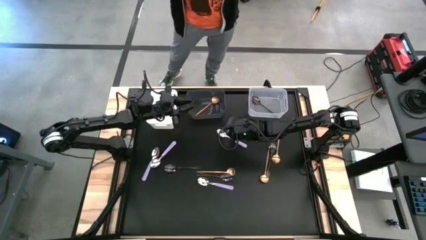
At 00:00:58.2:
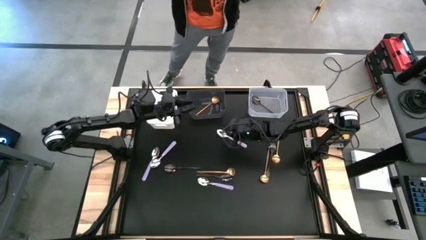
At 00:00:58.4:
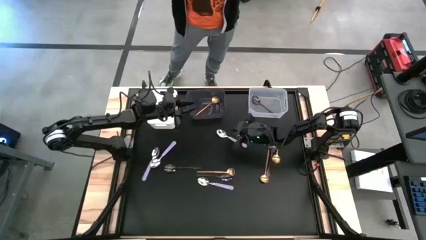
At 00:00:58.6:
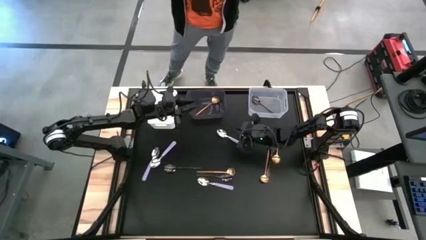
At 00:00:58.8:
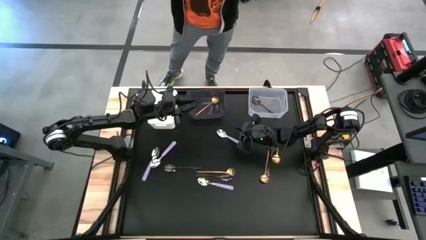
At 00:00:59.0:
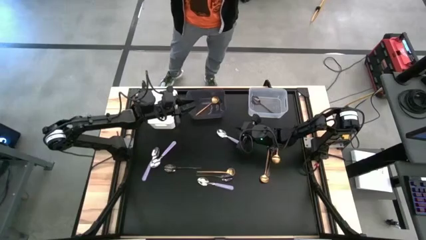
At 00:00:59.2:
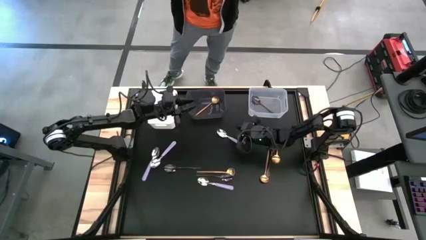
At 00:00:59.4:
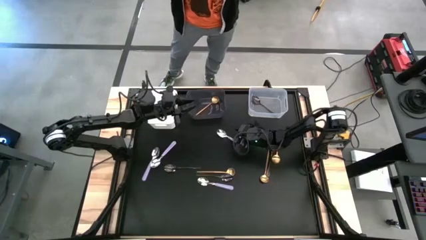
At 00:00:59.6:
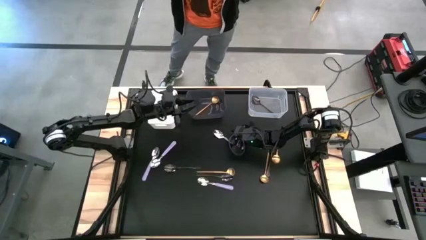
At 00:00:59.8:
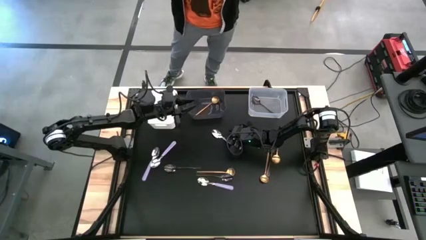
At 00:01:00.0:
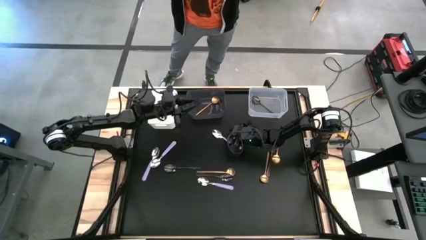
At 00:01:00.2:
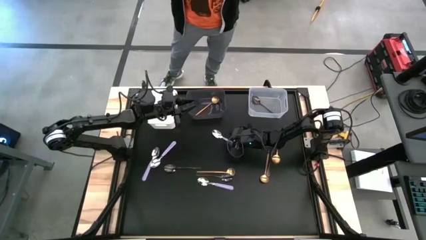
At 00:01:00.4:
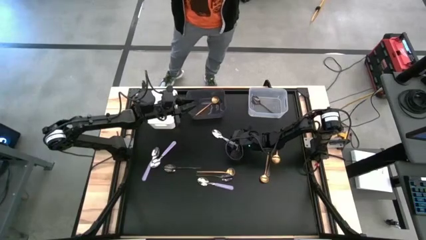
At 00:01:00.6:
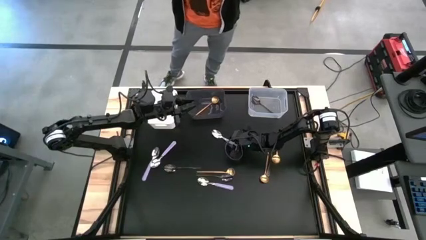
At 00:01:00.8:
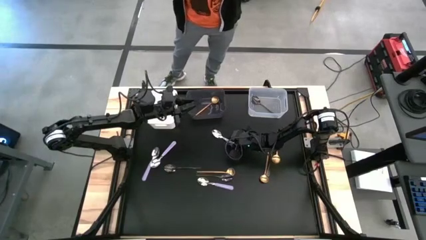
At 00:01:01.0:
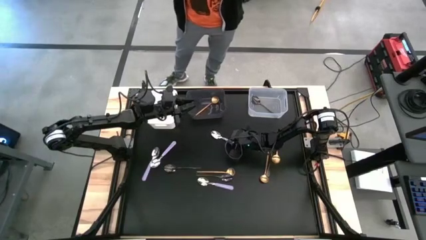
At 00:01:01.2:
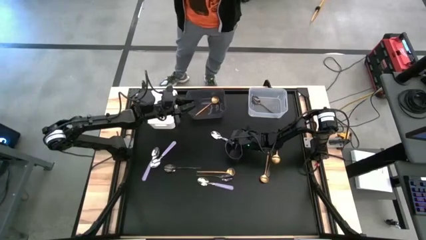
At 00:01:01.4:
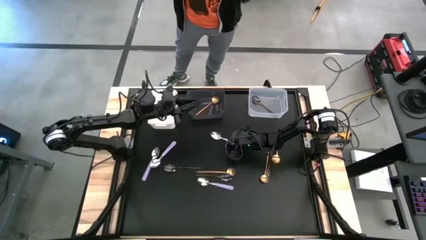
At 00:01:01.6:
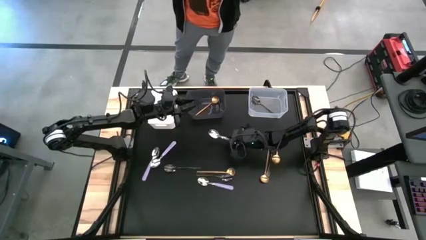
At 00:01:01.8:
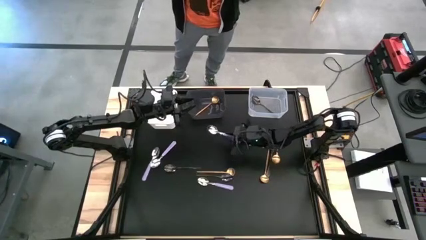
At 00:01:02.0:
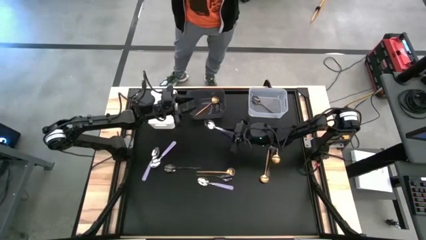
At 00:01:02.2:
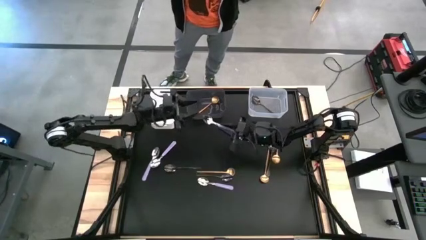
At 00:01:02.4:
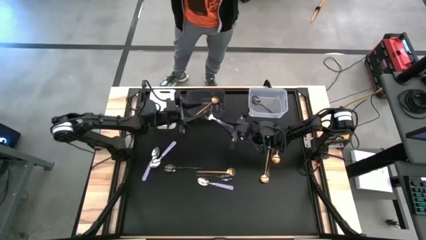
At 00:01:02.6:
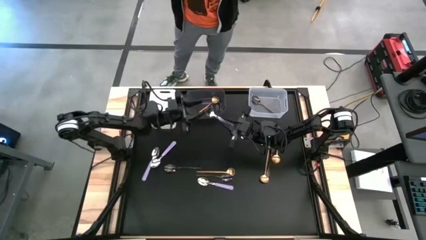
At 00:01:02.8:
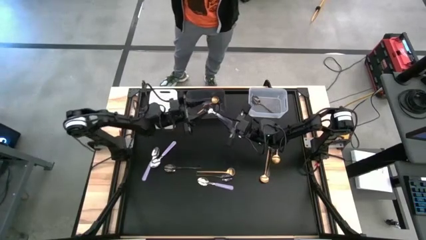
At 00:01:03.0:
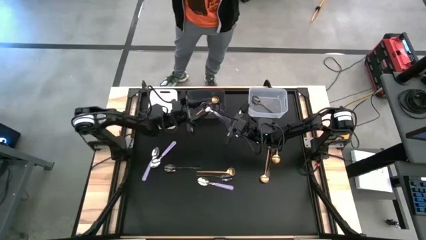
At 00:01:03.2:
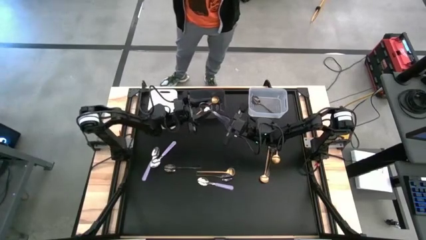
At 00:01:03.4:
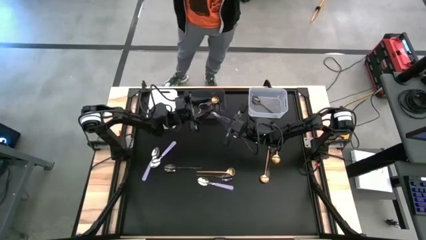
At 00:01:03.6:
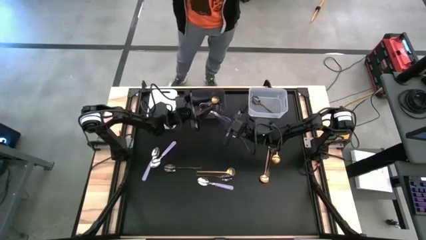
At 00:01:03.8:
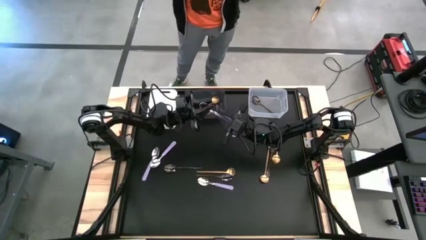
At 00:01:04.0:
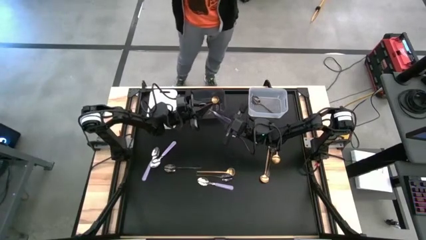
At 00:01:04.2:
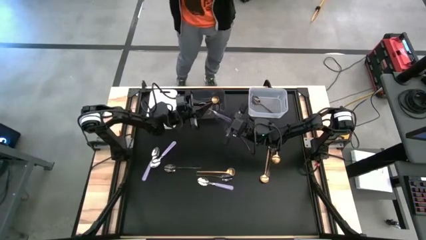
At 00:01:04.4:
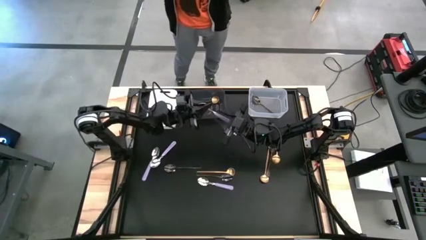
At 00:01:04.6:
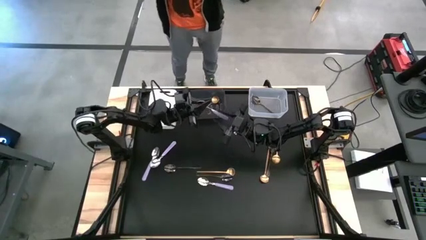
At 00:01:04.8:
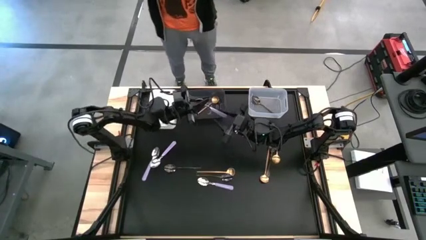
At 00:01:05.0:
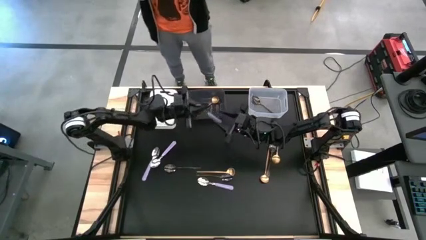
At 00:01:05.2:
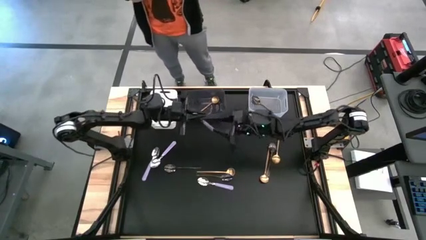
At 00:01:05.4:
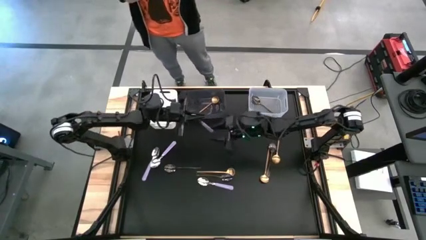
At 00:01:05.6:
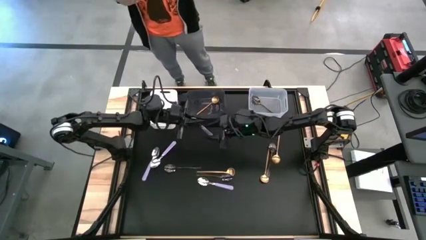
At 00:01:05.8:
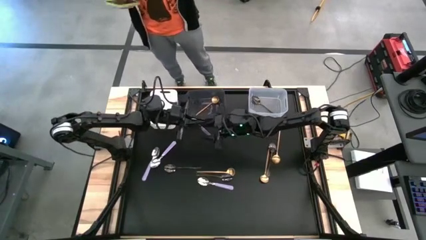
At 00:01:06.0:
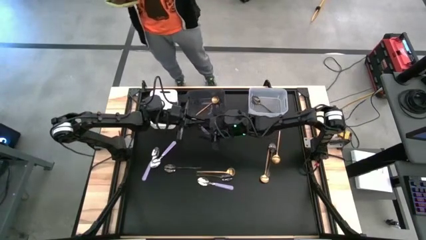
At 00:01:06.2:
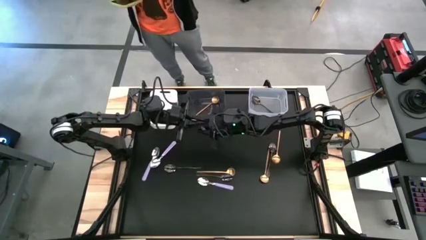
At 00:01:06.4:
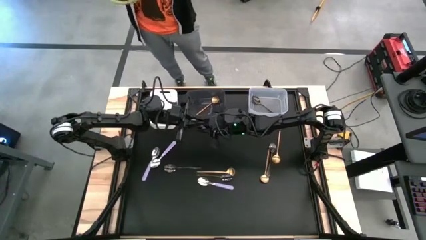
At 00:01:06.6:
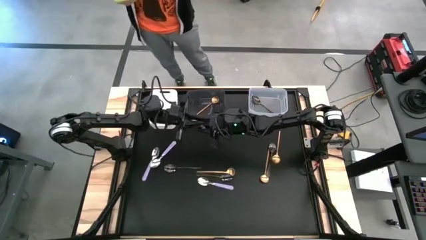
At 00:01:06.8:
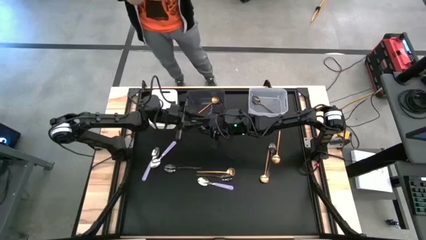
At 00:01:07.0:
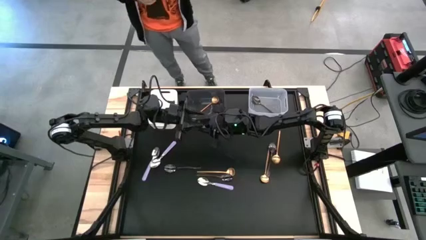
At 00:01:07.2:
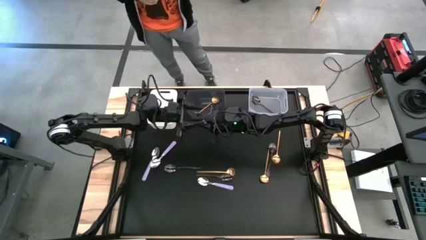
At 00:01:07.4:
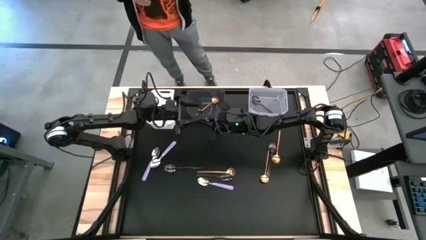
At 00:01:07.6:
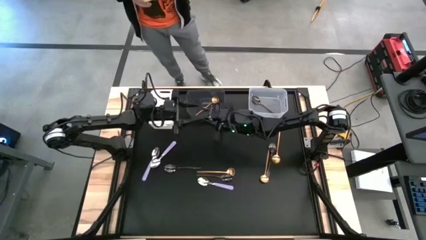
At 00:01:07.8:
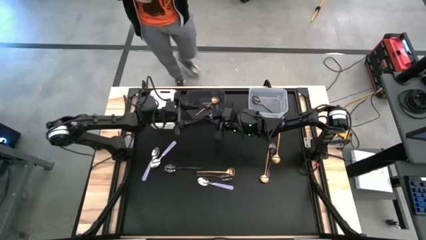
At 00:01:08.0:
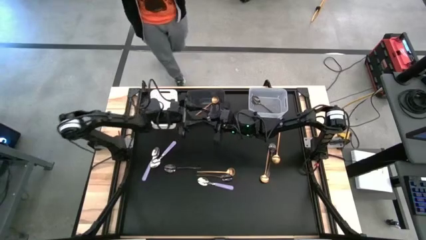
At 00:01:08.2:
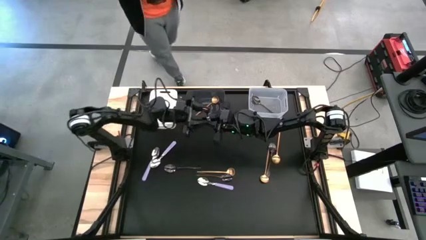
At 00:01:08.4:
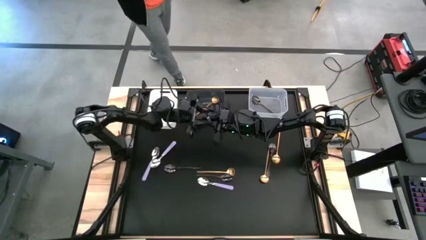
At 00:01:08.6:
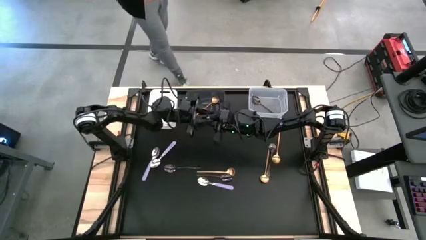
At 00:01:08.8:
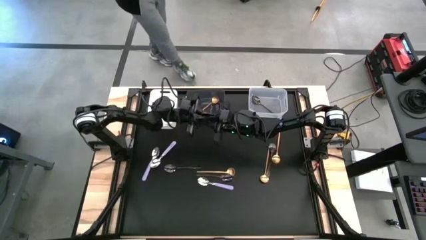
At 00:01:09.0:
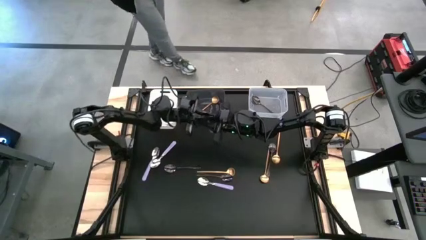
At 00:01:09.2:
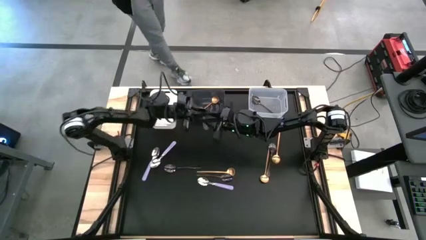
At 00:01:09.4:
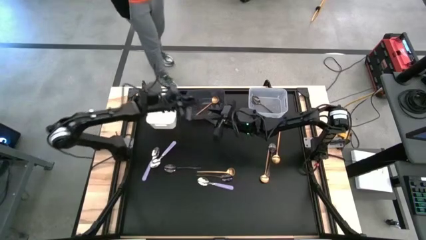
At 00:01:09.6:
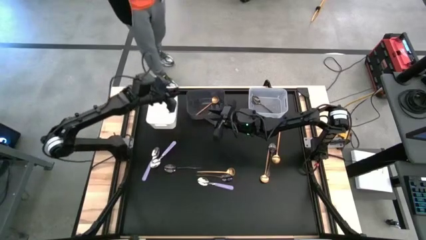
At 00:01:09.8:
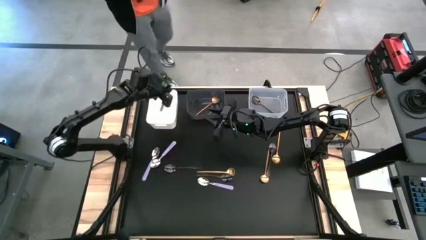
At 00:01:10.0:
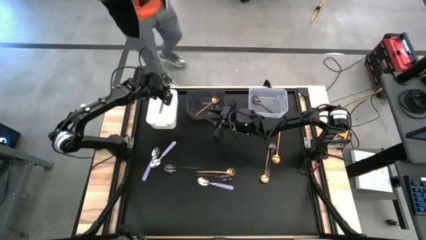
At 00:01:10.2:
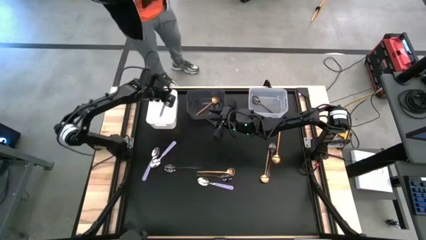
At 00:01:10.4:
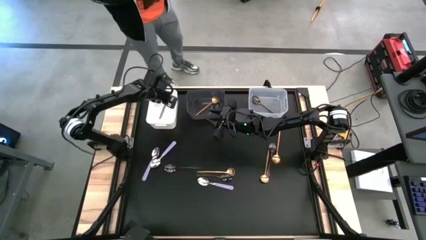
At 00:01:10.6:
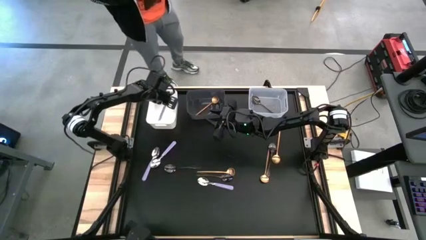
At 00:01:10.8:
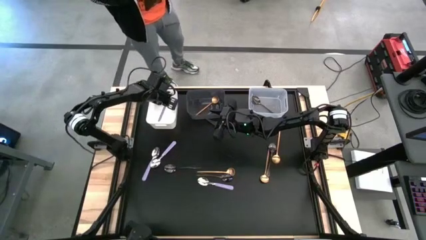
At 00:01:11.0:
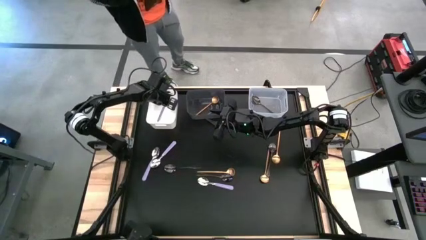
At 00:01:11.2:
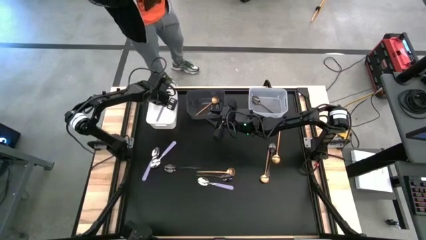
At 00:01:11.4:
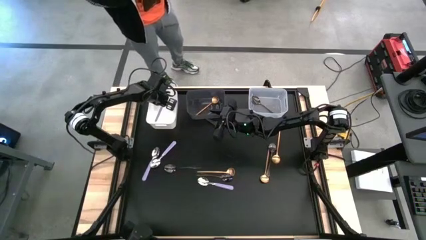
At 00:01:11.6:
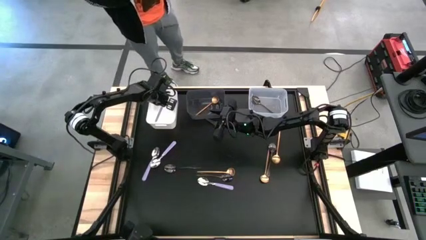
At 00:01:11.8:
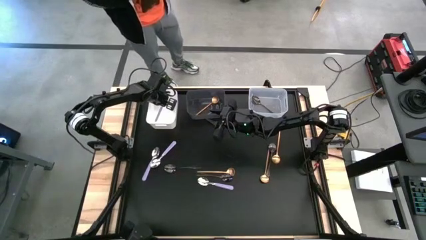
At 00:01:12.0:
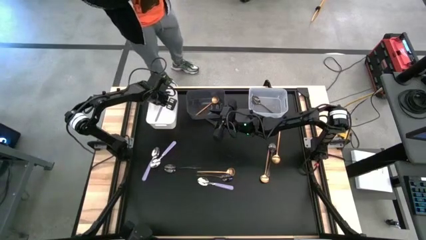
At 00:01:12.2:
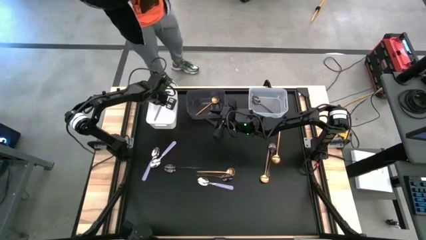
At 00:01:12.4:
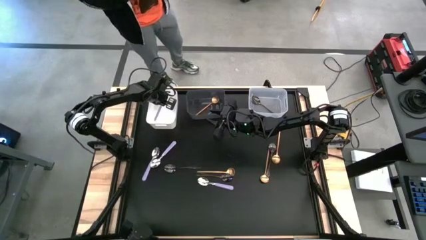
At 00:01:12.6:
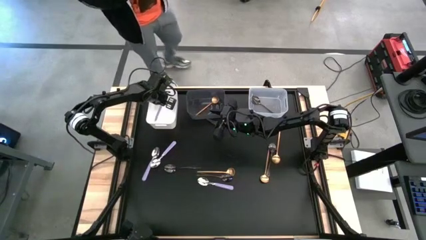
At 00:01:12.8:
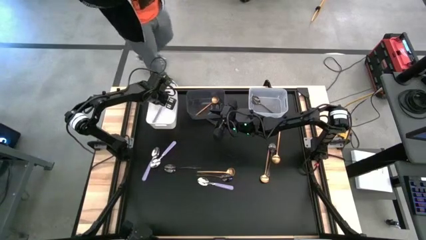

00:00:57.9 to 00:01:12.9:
Task: Sort silverware by color (type)
Put the purple spoon into the white bin
